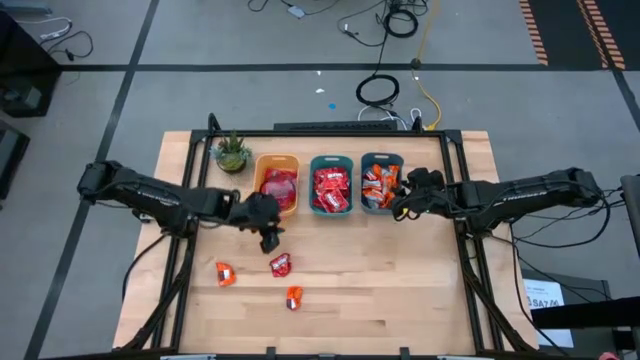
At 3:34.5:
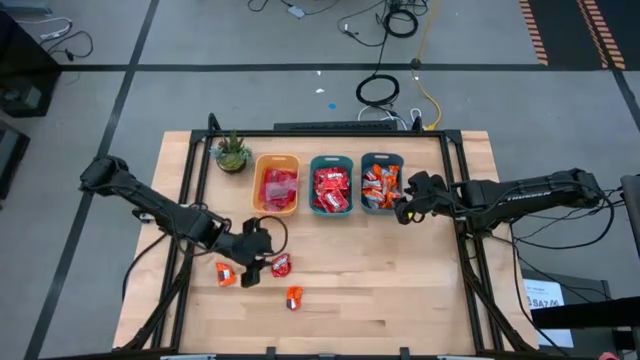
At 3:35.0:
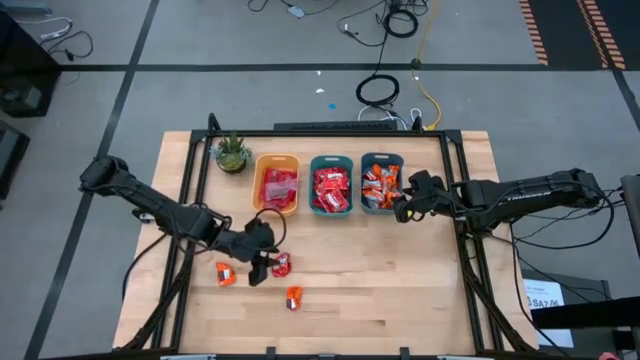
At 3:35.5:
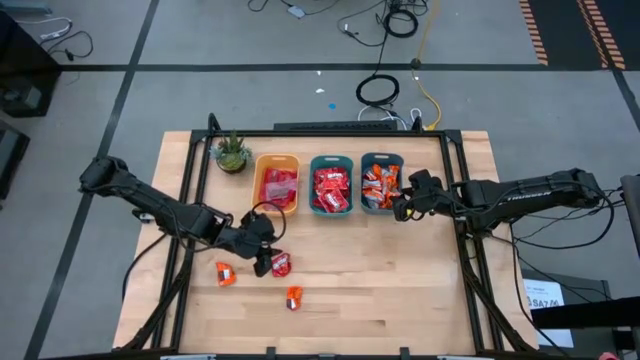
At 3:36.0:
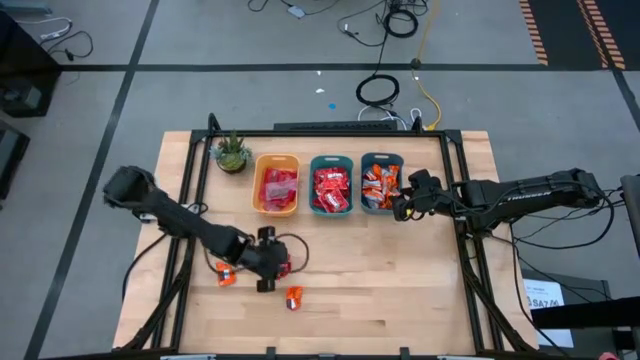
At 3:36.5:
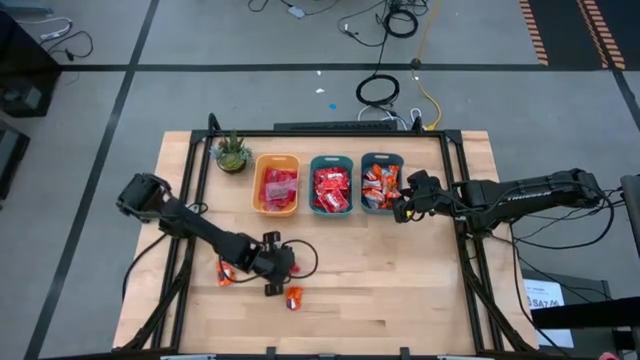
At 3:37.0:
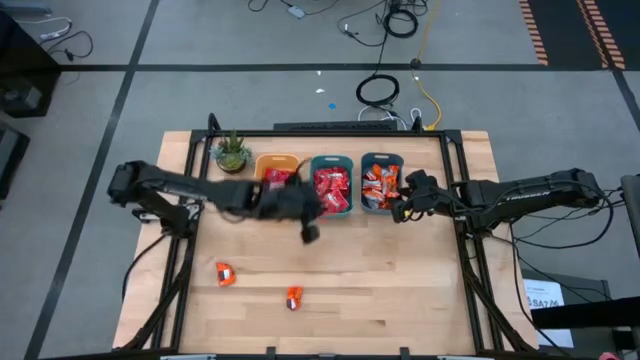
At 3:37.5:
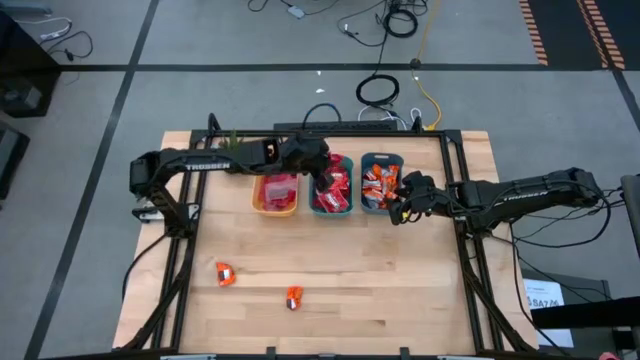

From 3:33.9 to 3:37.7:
Task: Sort candy
Put the red candy into the top center green bin

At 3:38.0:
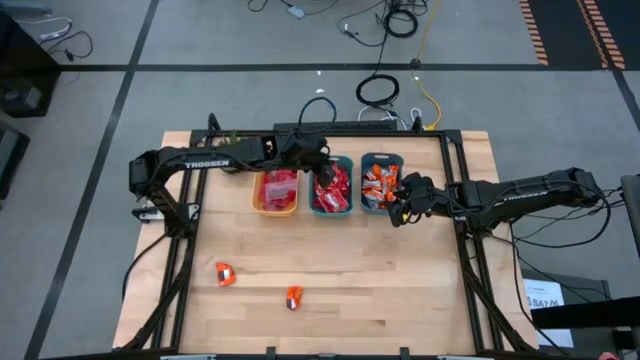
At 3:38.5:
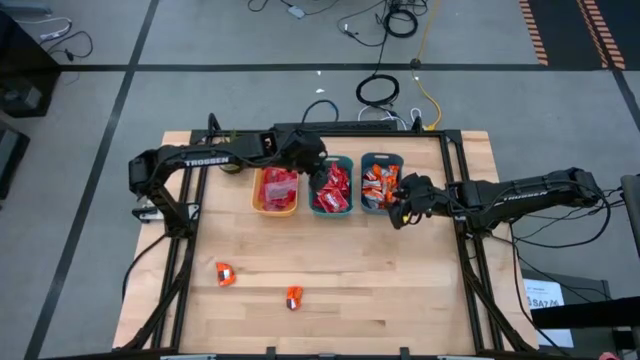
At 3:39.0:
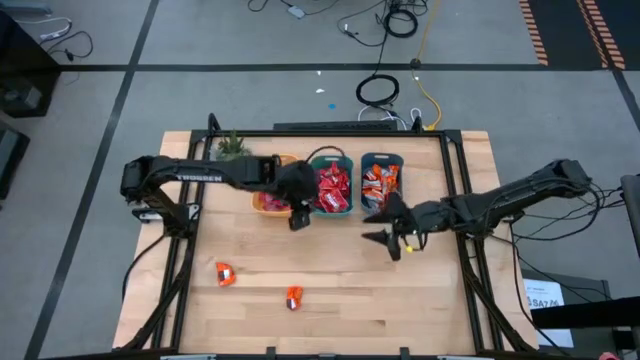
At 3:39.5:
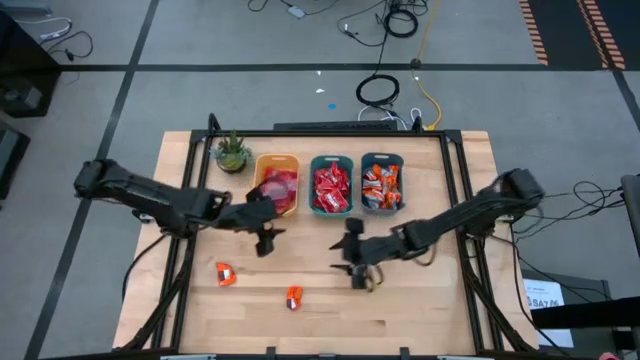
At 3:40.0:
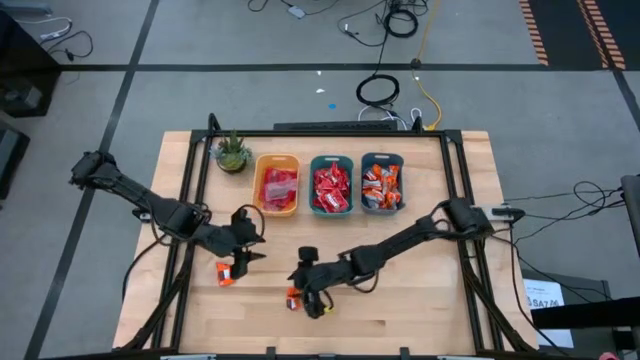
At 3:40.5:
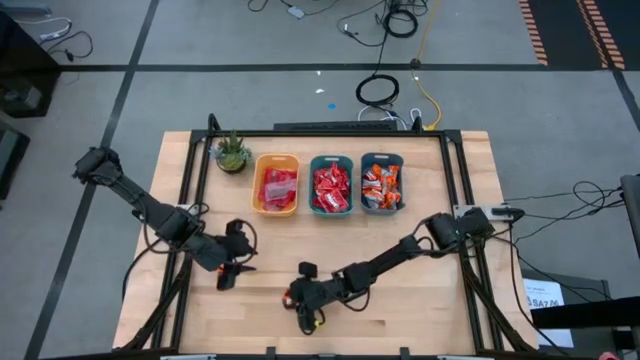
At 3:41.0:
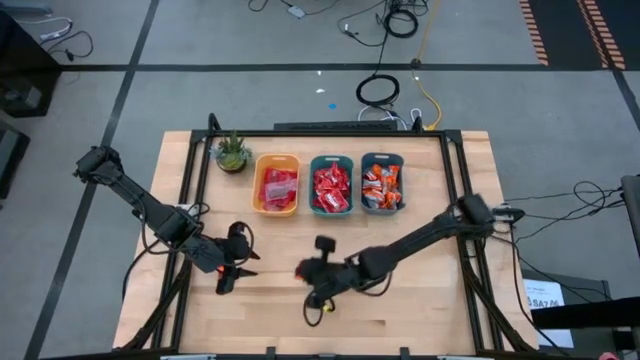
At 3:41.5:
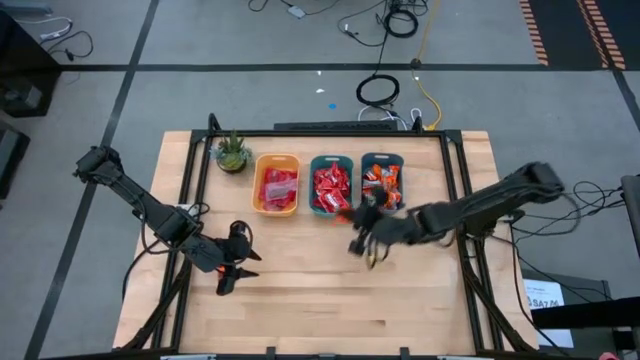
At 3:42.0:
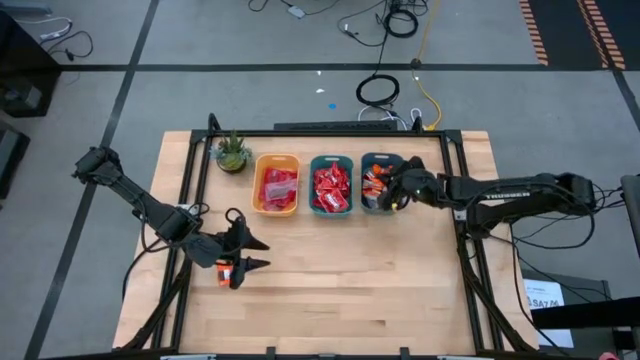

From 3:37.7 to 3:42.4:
Put the orange candy into the top right blue bin

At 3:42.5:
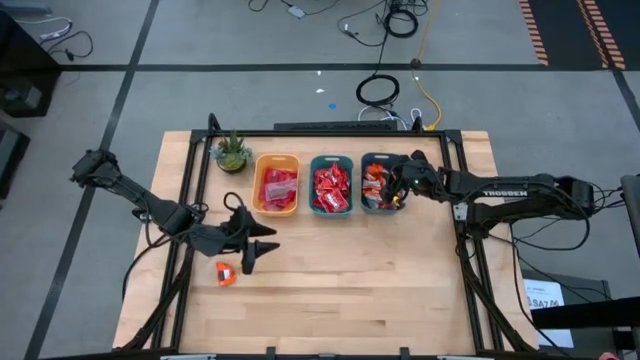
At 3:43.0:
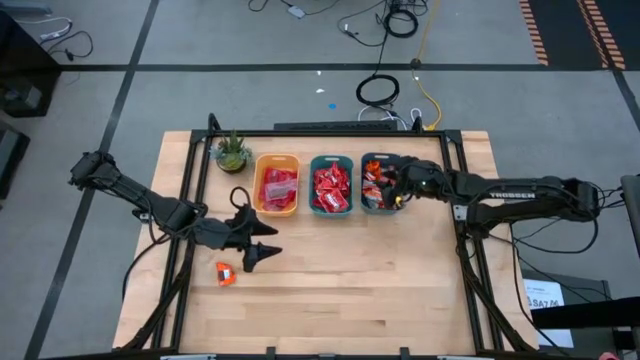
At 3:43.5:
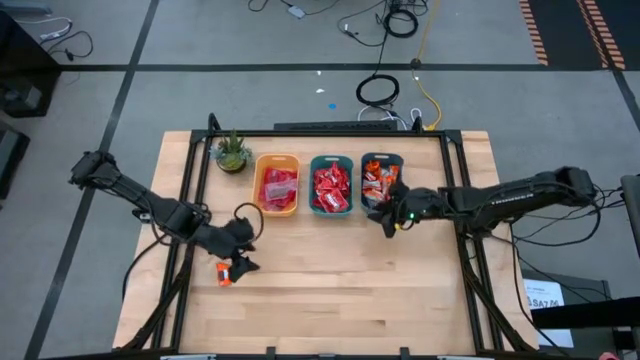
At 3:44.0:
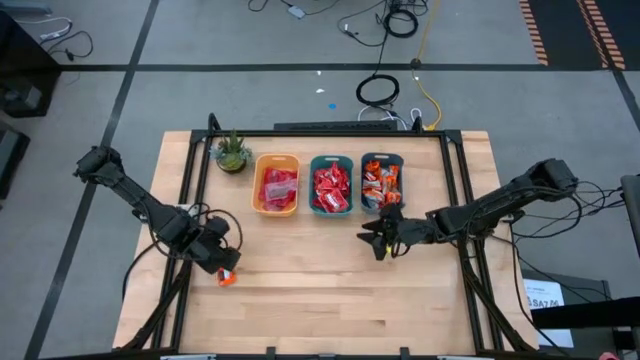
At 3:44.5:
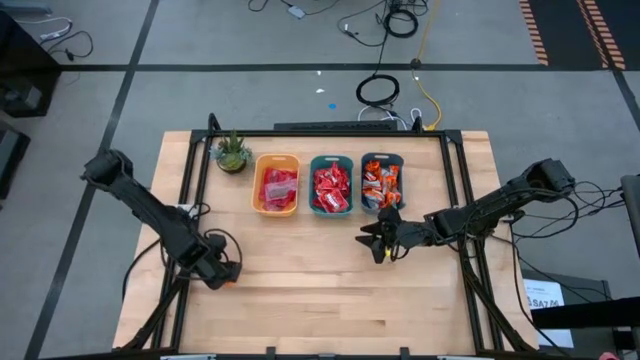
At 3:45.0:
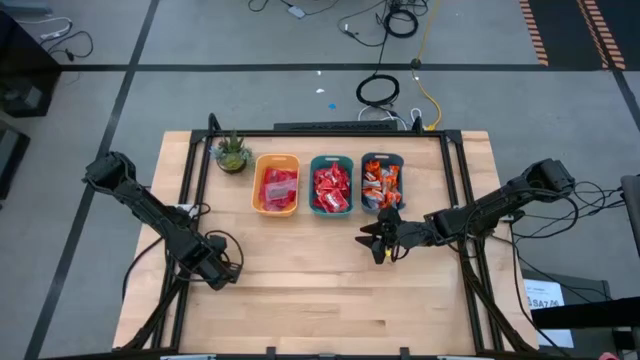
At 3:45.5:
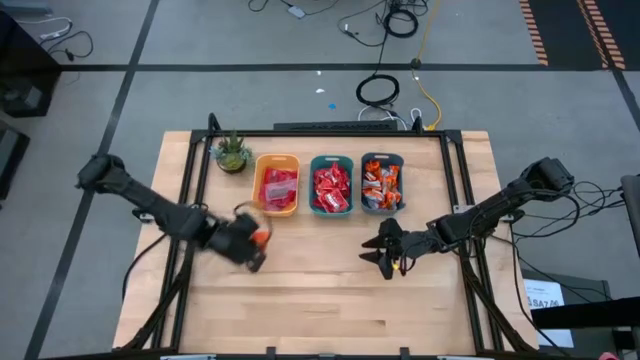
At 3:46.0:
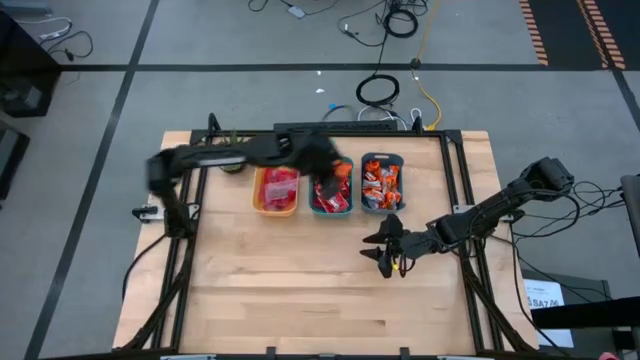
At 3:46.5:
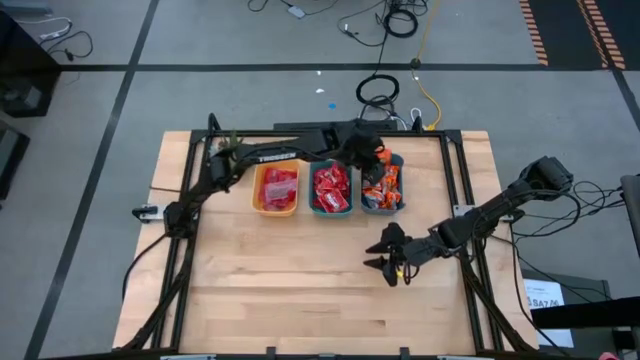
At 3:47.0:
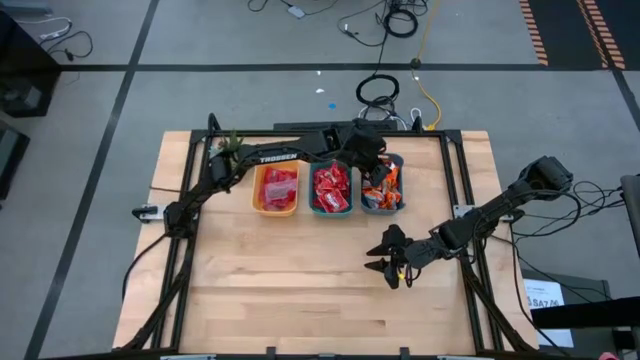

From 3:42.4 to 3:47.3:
Put the orange candy into the top right blue bin

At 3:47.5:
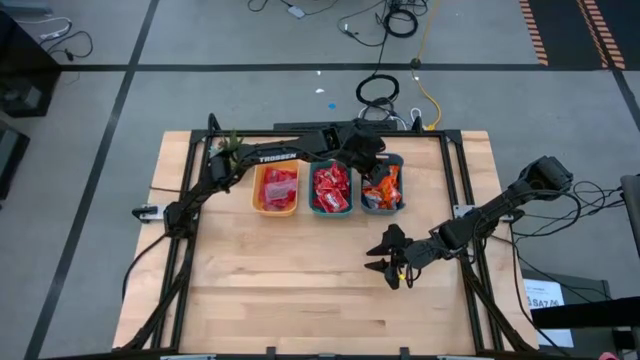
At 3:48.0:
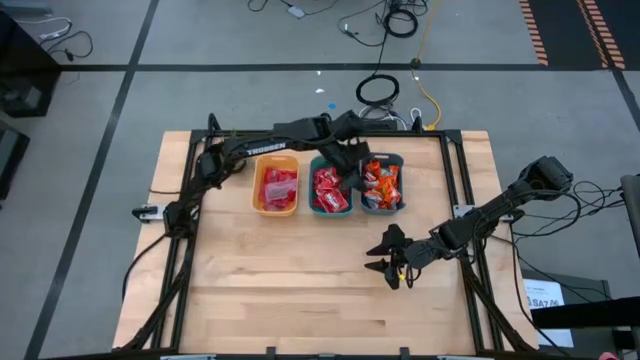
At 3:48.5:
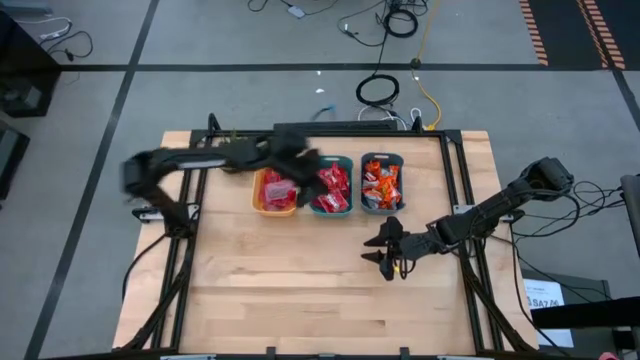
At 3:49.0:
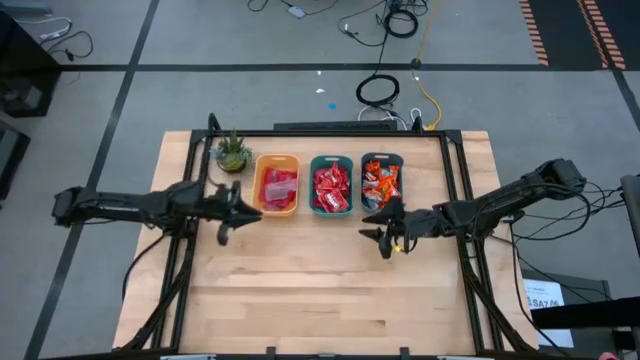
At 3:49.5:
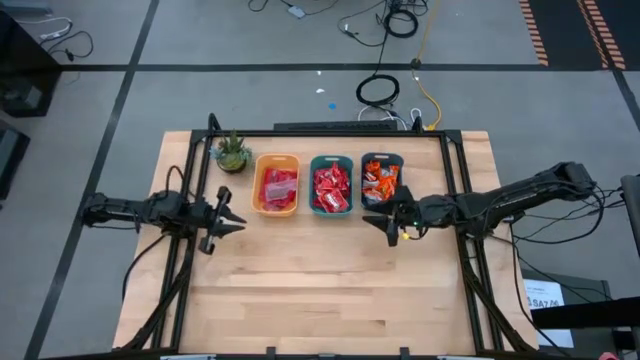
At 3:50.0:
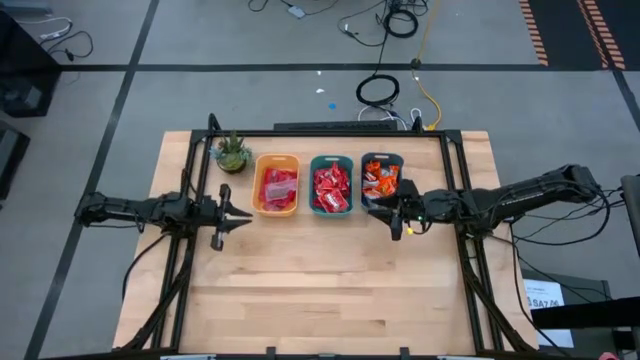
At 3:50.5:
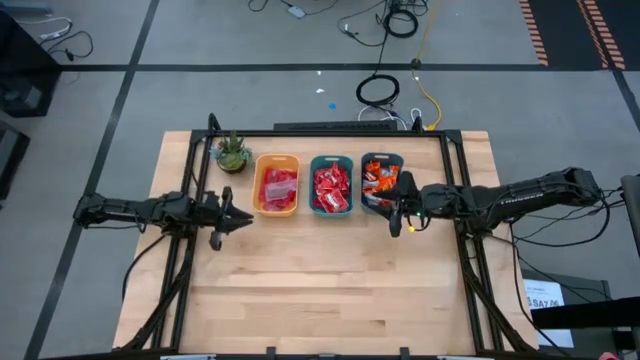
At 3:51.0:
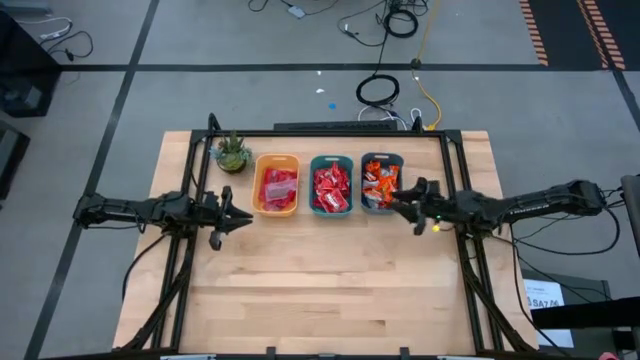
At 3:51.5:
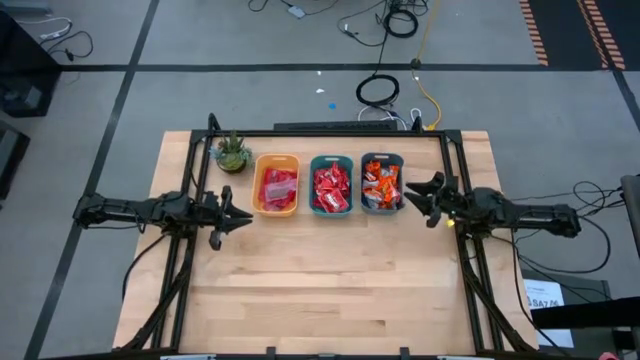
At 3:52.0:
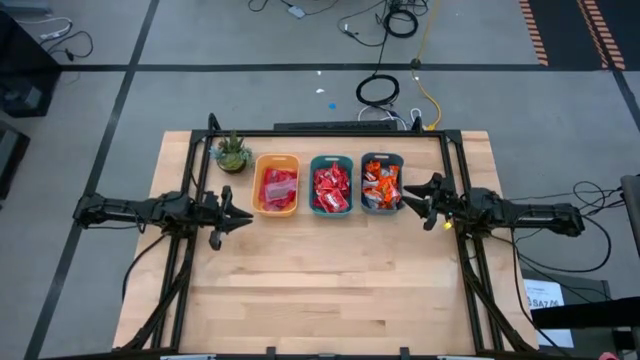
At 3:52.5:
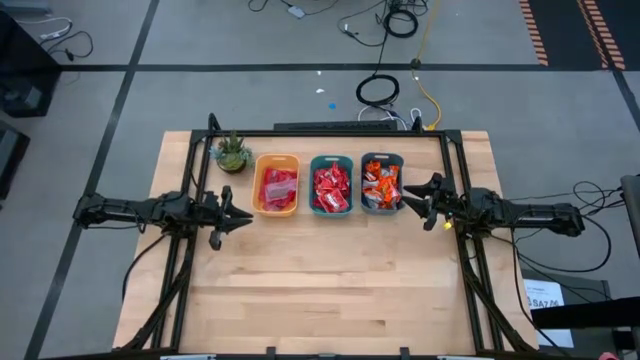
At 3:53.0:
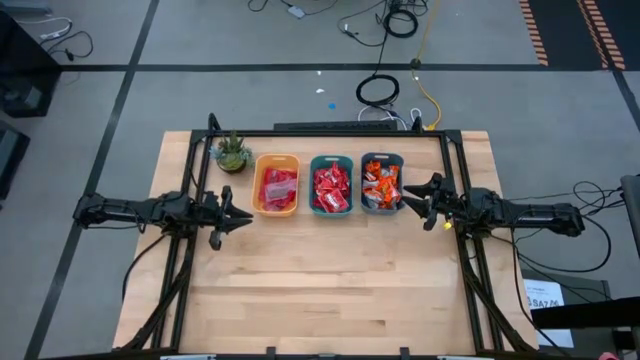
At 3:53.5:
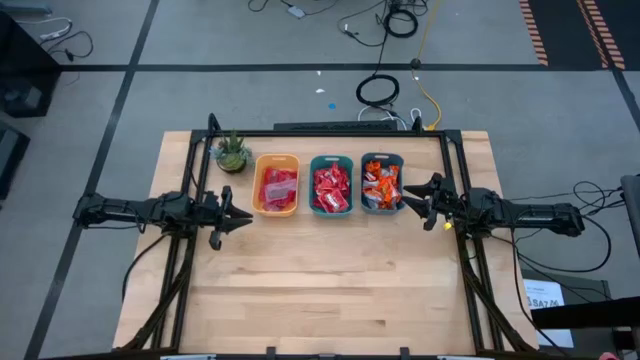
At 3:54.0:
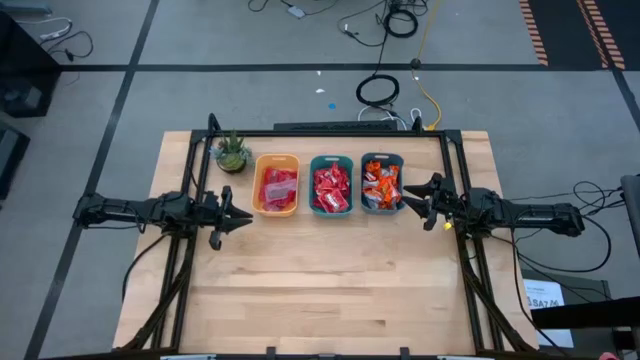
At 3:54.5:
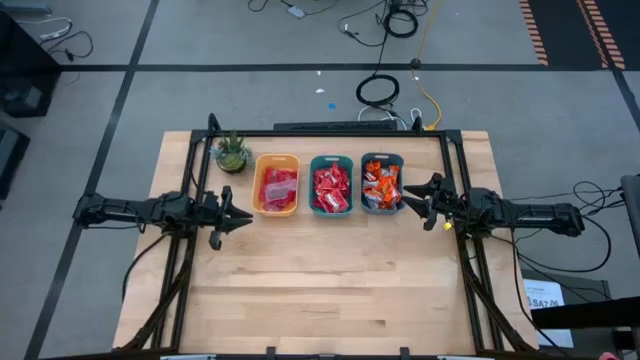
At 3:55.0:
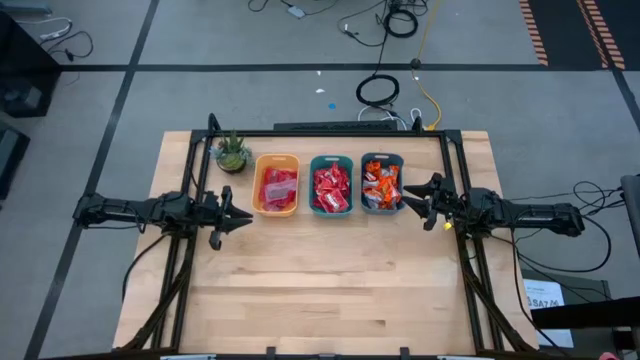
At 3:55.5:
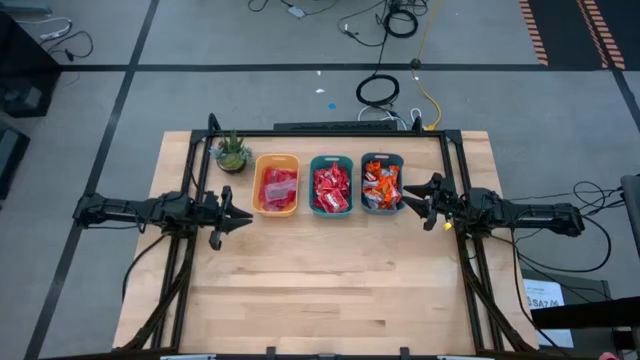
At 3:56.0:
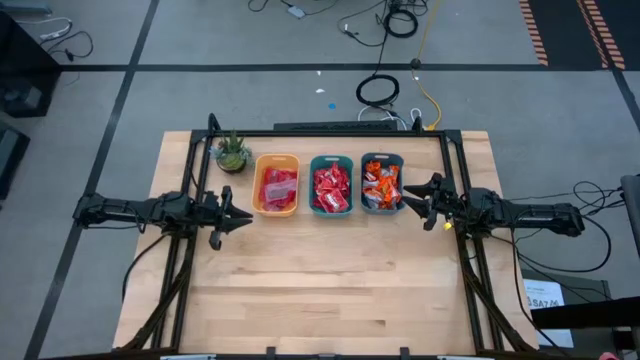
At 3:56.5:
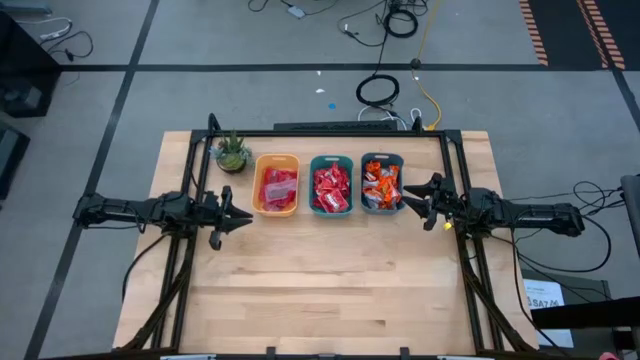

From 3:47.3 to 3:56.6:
Return to Home Position
